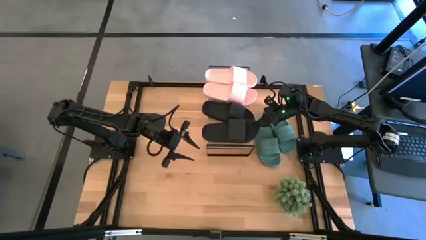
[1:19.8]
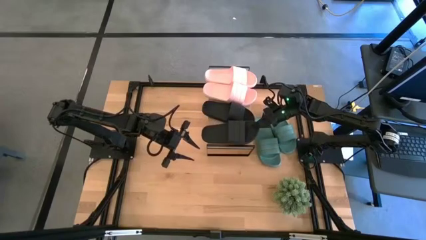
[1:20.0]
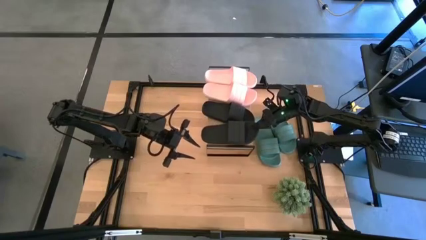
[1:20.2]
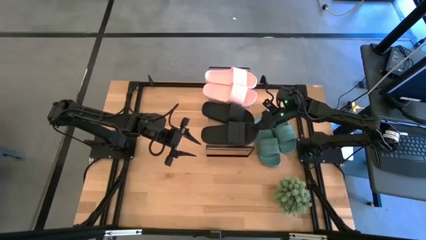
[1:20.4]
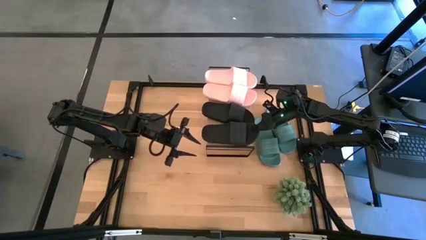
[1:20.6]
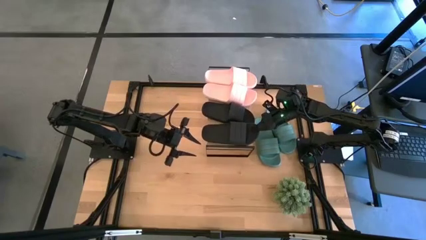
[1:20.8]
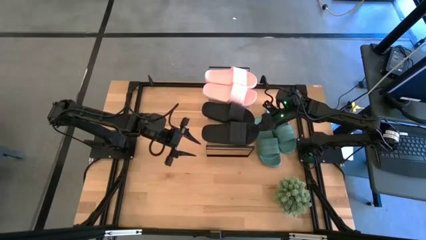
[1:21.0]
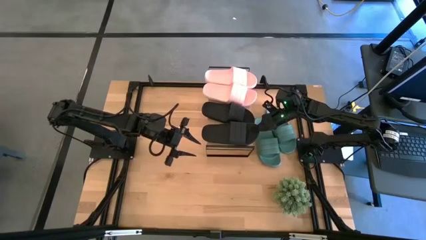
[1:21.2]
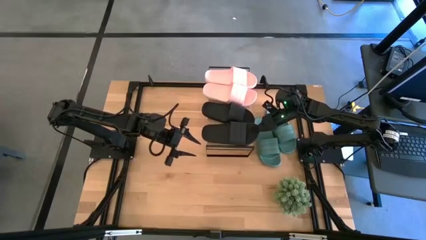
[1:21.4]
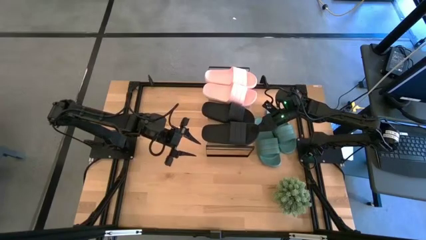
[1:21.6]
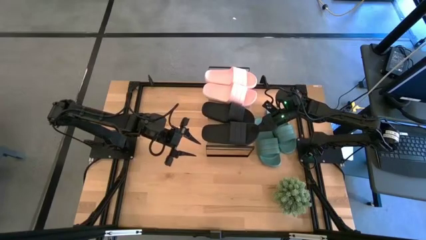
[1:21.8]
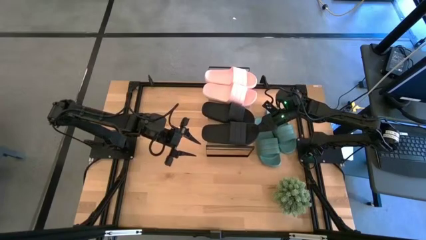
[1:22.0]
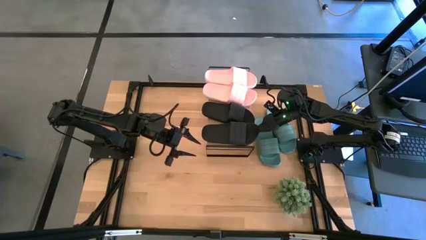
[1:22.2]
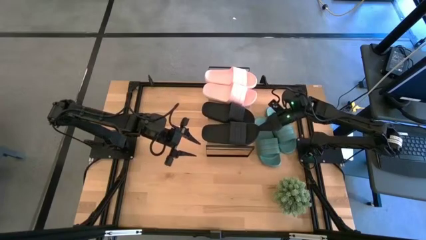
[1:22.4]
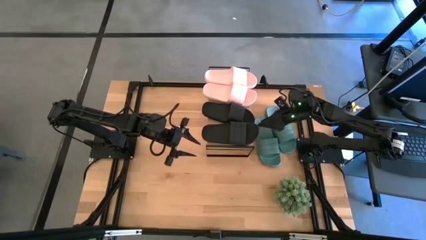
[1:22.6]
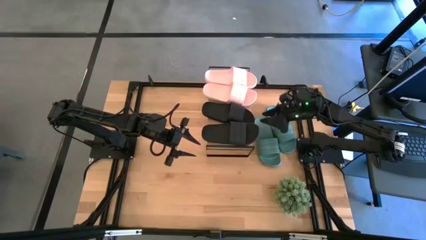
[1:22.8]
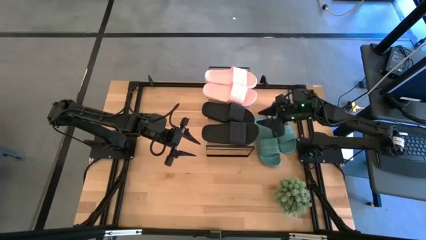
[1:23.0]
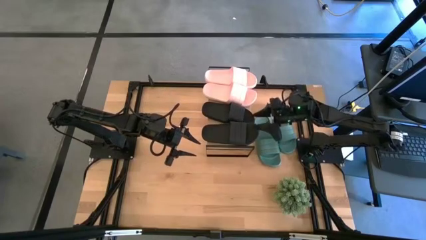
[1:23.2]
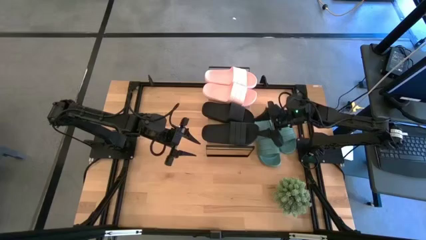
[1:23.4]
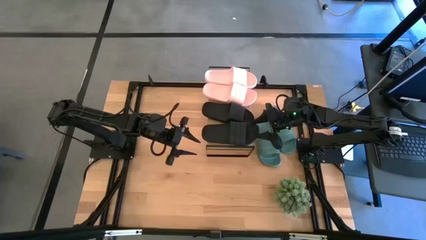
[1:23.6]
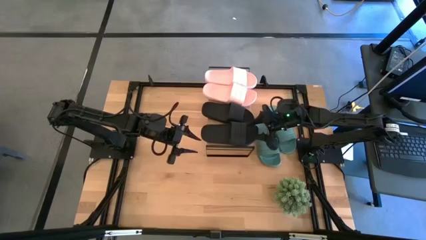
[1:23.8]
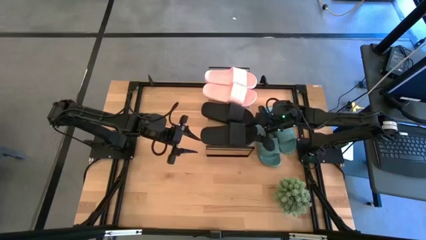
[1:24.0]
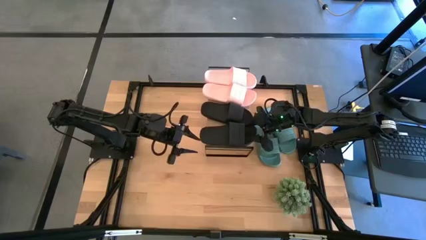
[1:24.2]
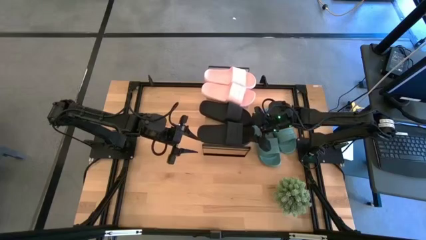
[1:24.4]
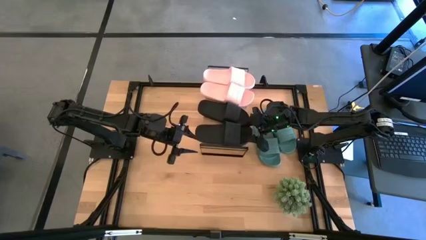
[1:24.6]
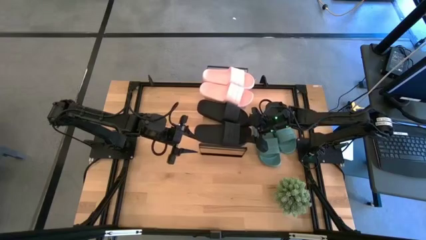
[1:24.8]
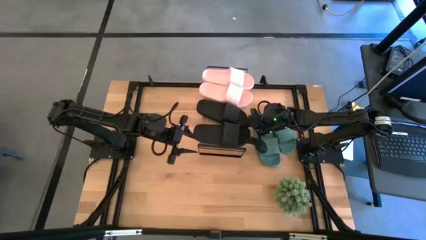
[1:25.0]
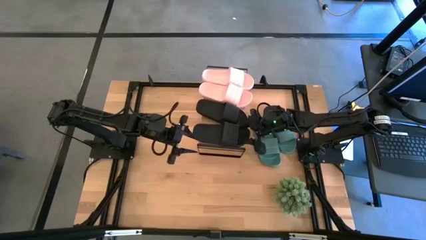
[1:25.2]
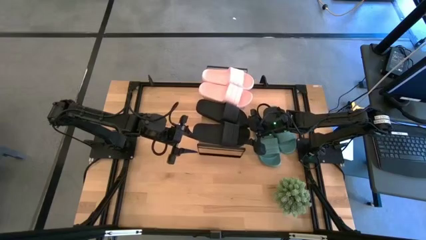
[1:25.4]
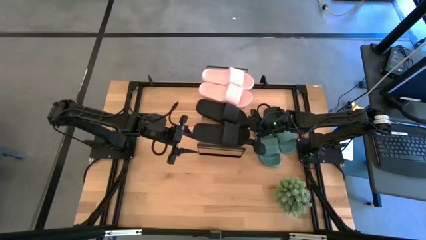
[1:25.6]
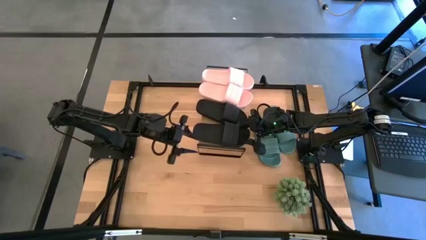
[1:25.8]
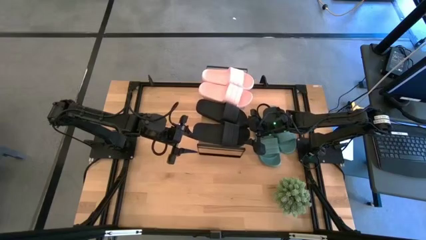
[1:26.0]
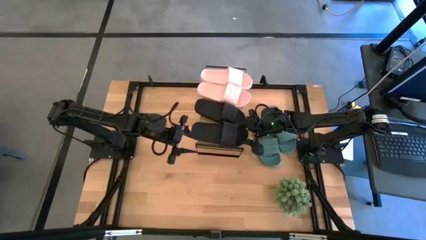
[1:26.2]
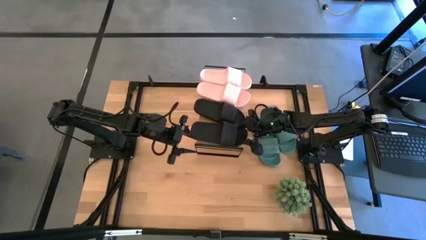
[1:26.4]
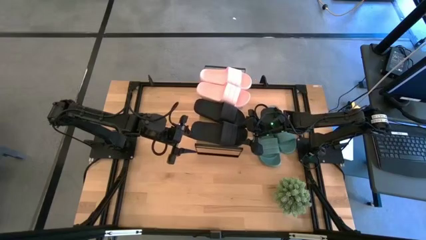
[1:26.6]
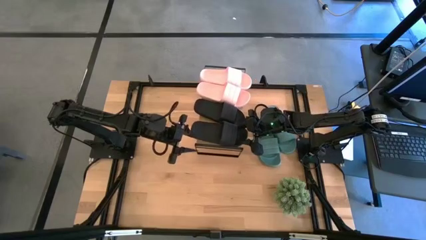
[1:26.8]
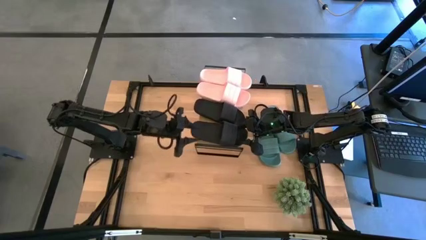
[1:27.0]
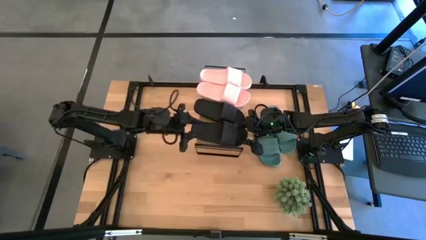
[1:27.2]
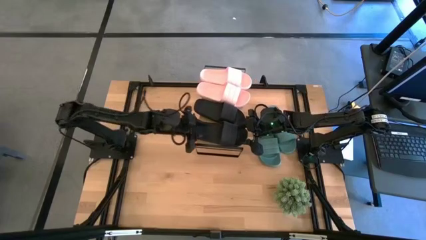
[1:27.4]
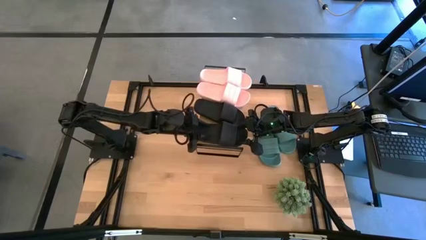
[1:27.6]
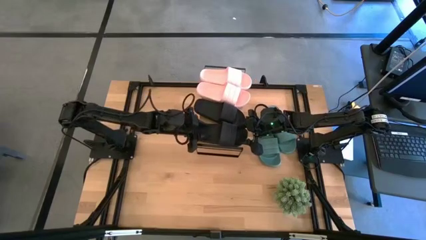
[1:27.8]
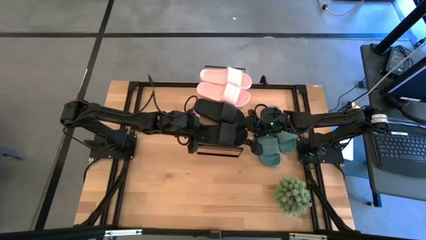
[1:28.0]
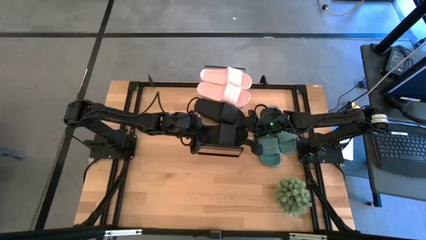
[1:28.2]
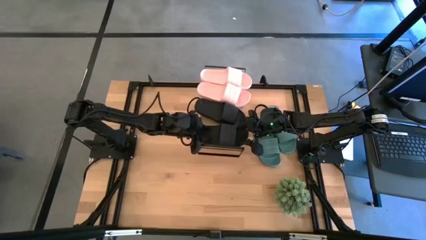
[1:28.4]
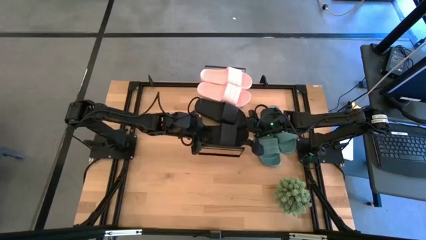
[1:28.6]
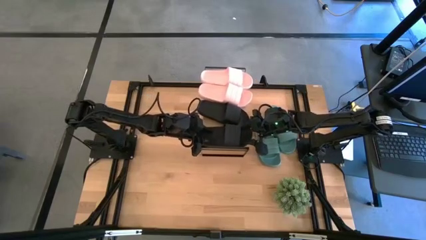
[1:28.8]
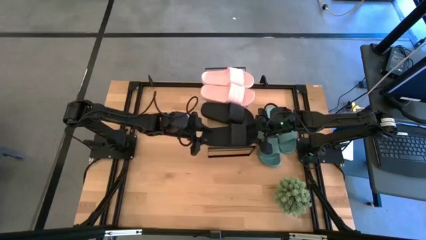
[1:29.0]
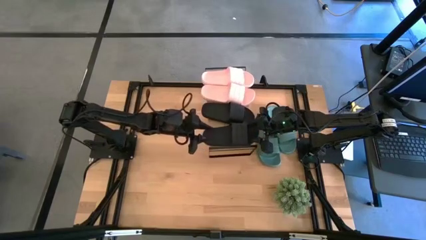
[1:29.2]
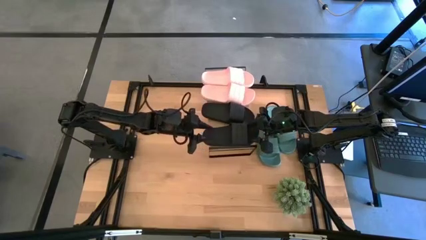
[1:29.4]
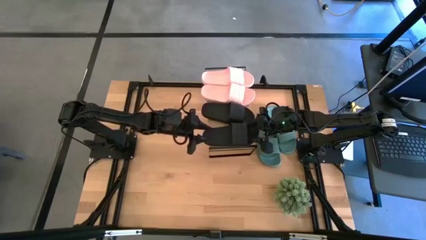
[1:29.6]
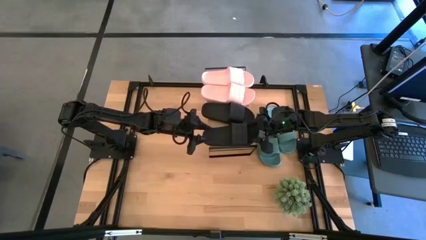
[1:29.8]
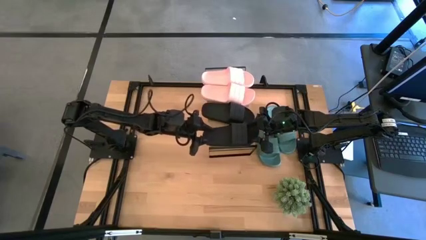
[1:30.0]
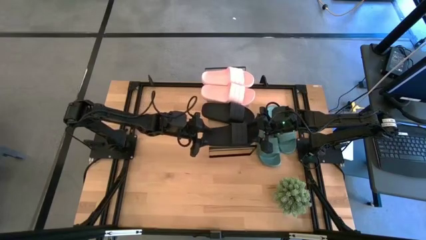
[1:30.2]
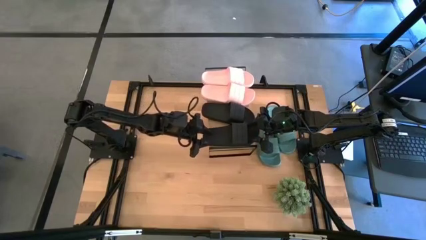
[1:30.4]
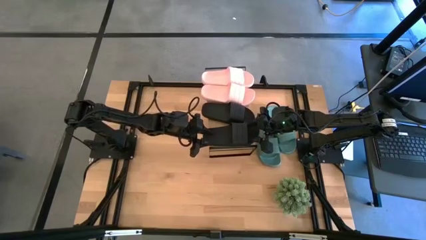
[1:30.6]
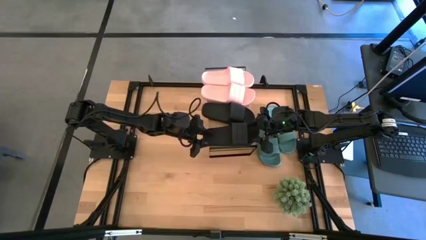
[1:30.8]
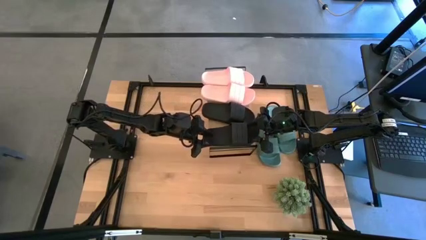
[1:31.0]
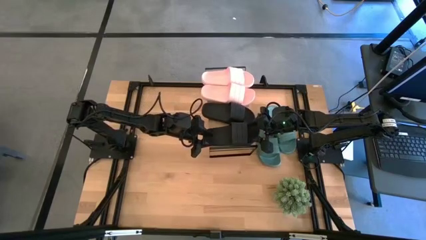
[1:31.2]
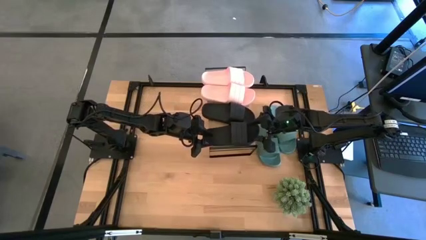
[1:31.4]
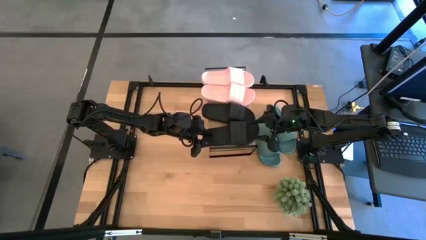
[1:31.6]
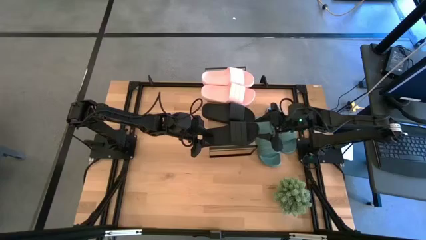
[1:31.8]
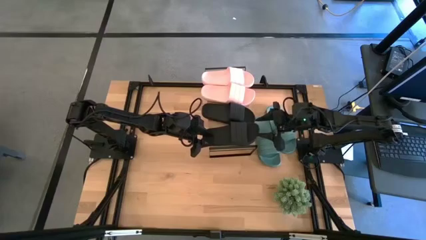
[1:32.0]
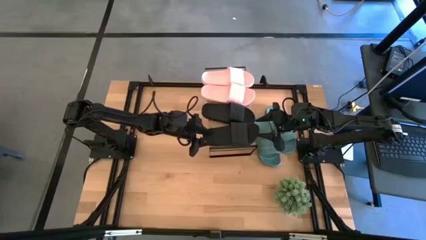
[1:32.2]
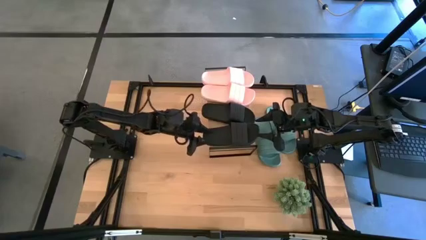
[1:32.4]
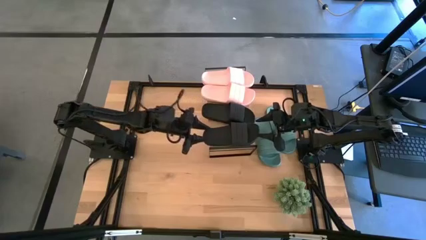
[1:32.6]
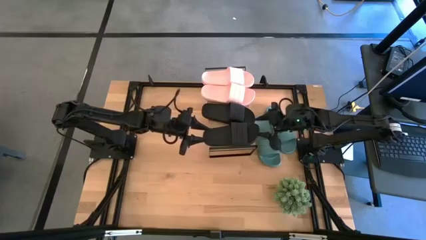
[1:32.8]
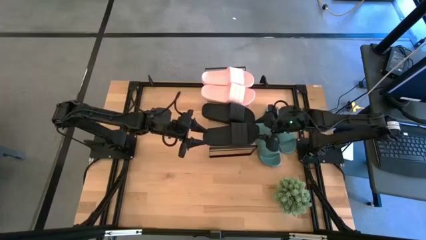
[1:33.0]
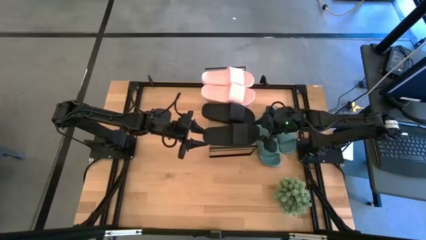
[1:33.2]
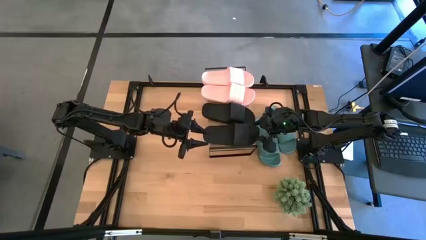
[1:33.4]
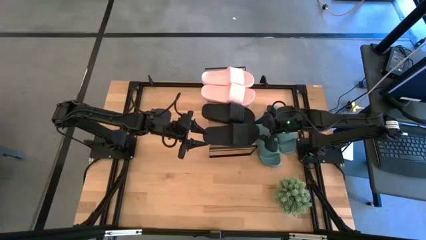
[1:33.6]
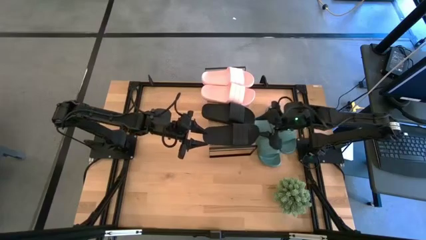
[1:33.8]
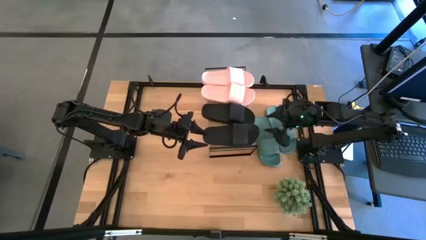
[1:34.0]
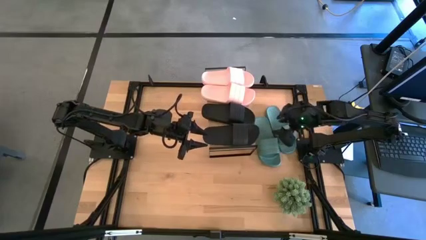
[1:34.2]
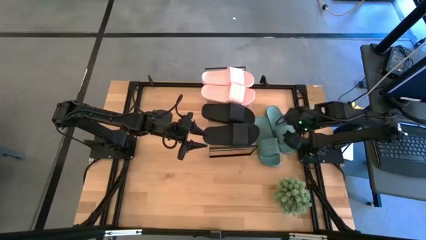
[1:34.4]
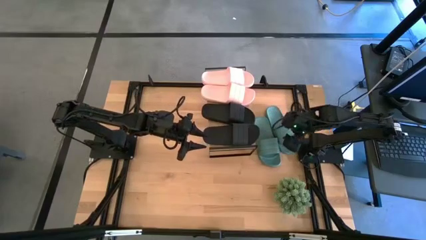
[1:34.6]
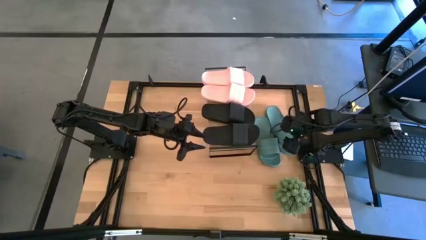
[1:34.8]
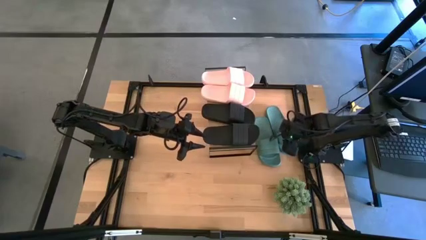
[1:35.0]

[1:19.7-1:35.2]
Task: Pick and place slides into the shelf
Put the black slide on the shelf
